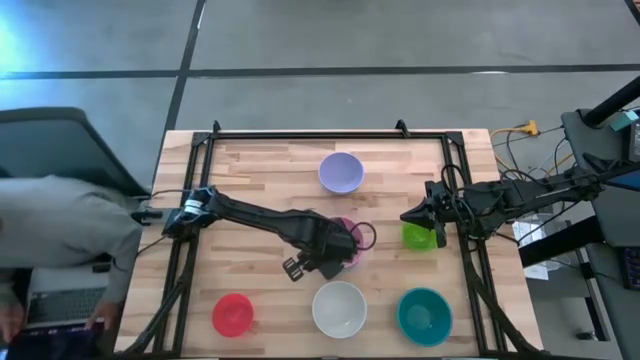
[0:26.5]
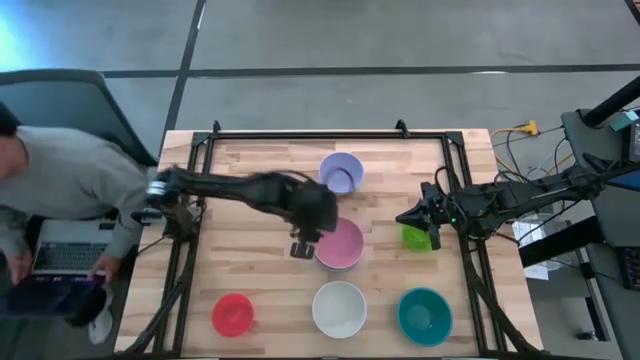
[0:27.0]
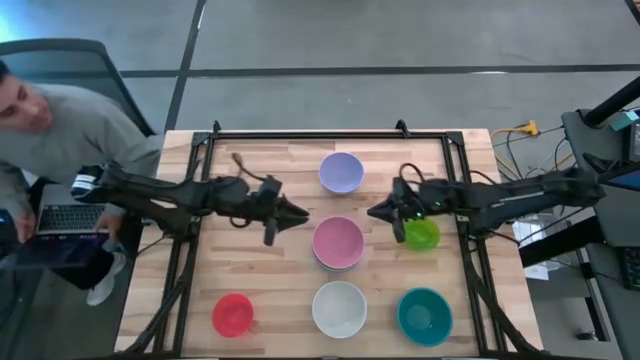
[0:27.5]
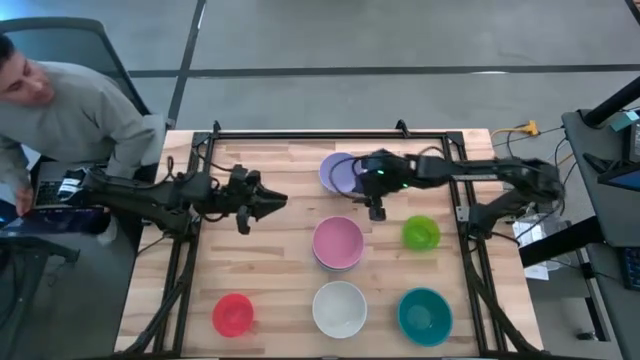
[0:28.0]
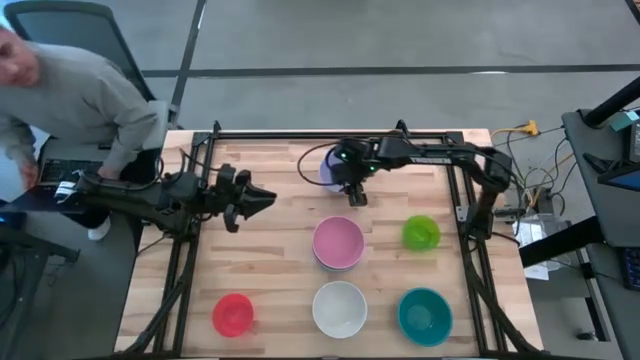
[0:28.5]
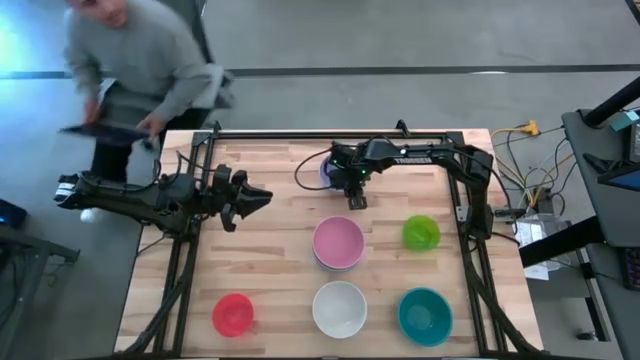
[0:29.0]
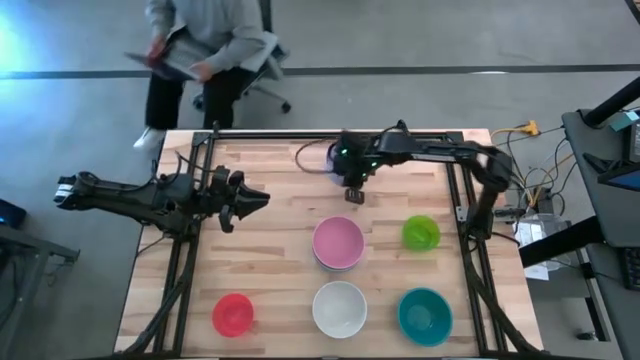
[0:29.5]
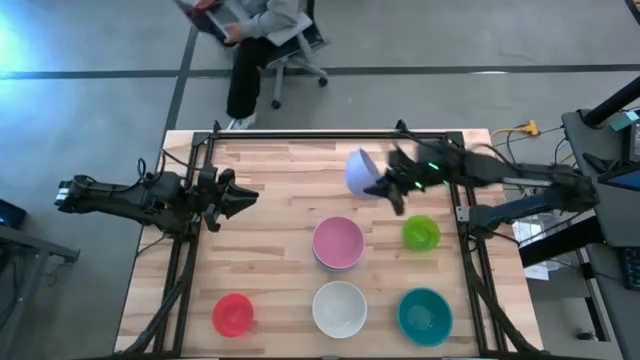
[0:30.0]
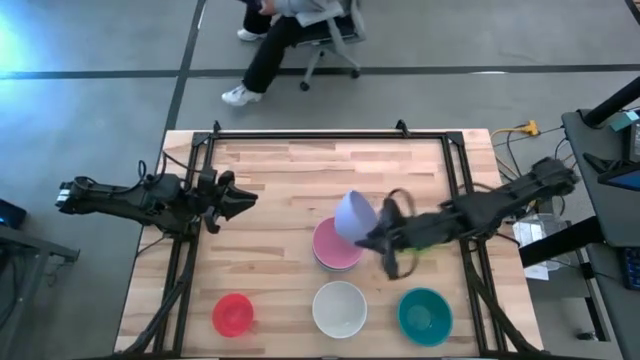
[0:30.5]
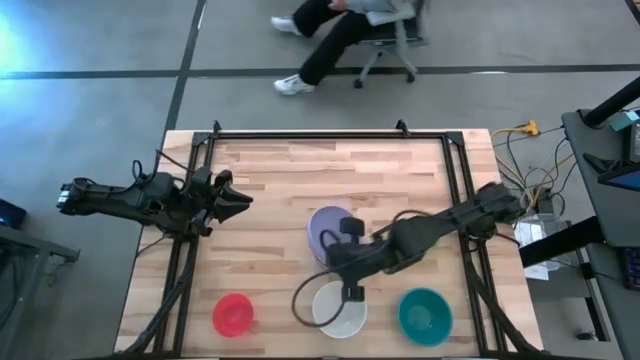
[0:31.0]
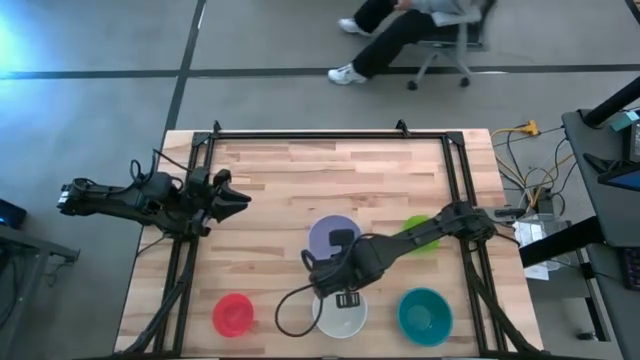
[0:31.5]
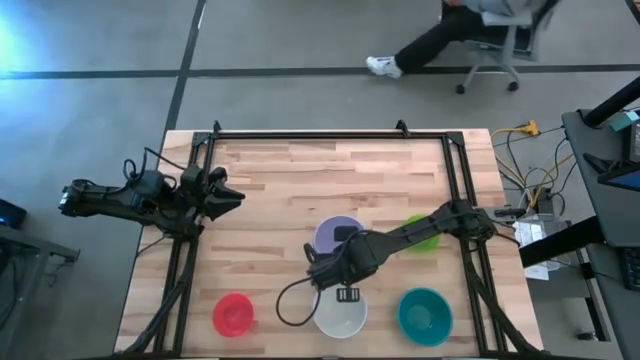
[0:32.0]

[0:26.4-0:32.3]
Task: Nest bowls inside each other
Stack the purple bowl on top of the pink bowl

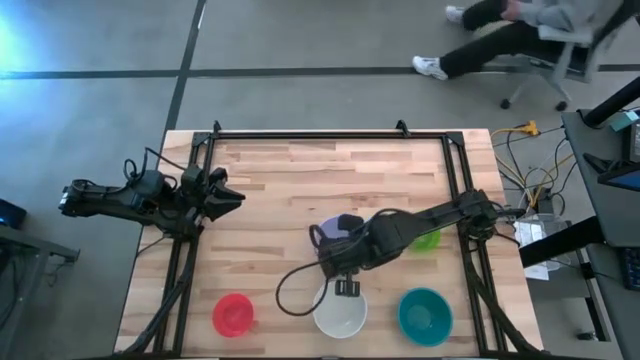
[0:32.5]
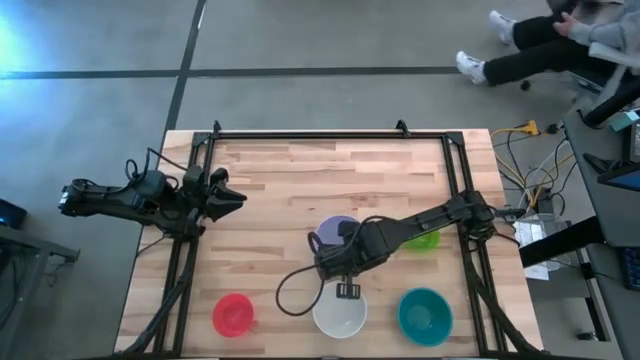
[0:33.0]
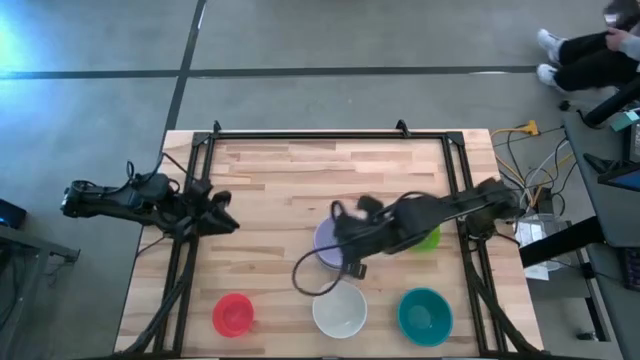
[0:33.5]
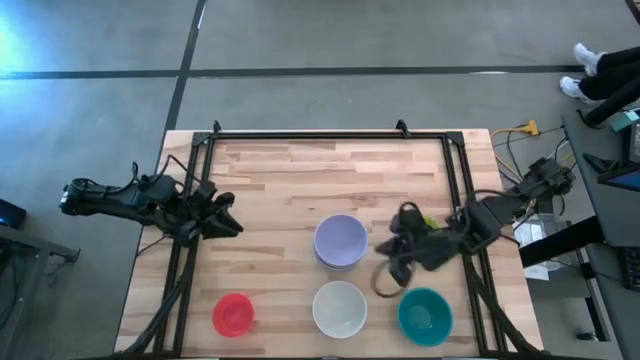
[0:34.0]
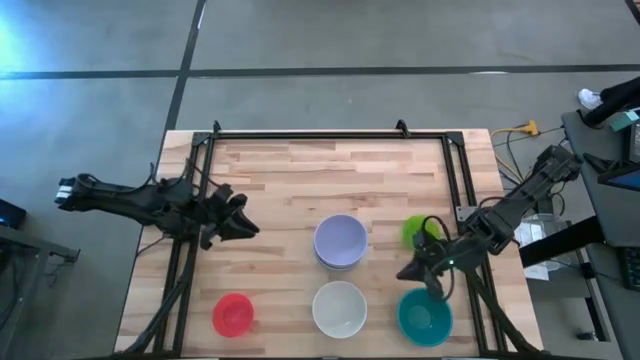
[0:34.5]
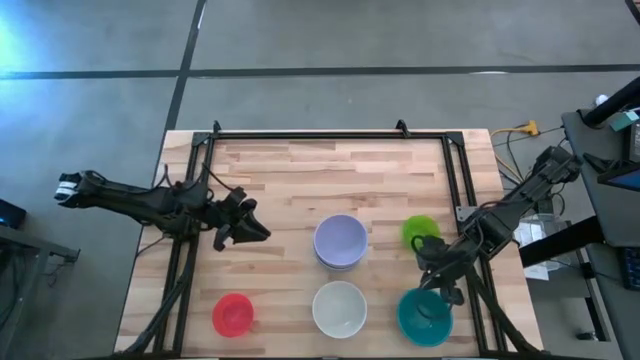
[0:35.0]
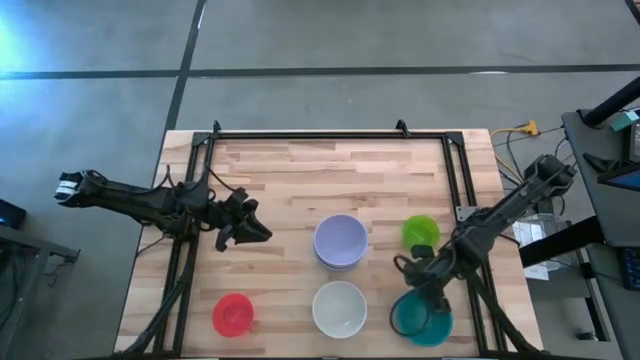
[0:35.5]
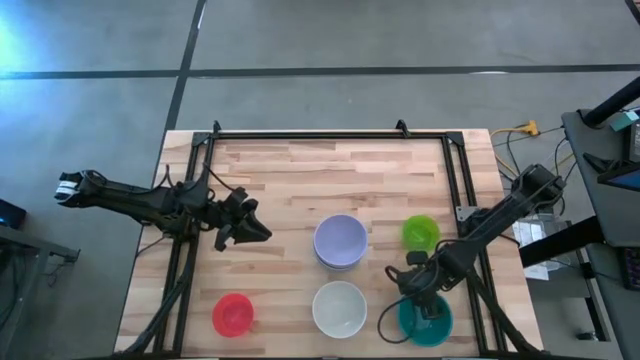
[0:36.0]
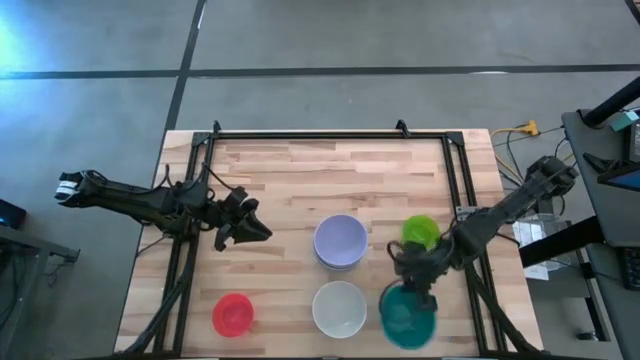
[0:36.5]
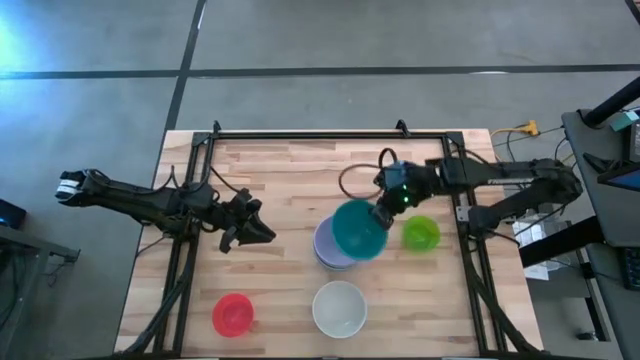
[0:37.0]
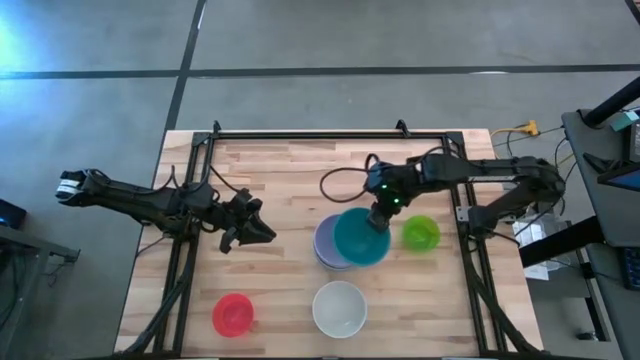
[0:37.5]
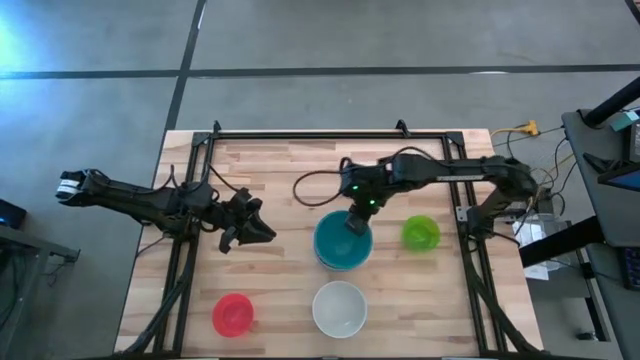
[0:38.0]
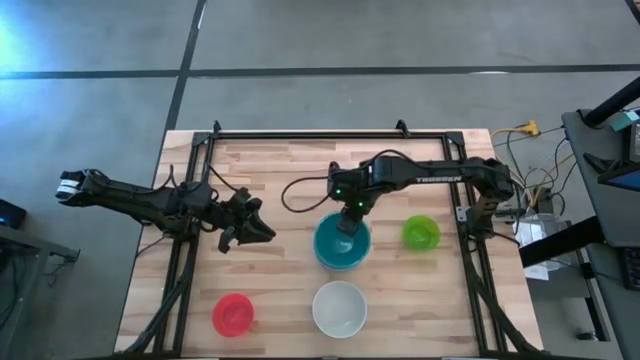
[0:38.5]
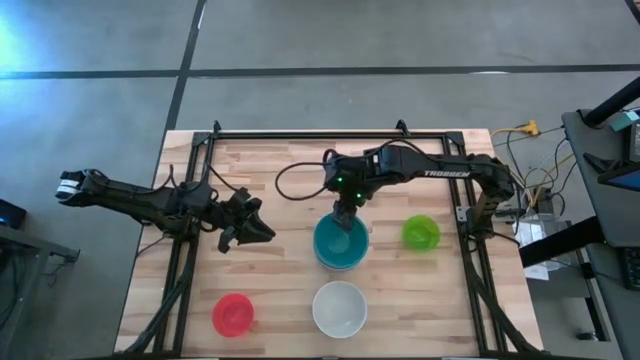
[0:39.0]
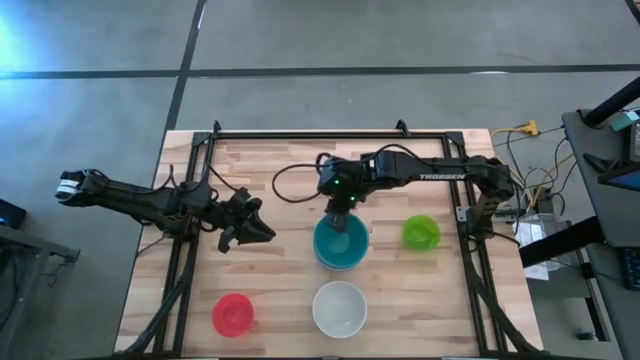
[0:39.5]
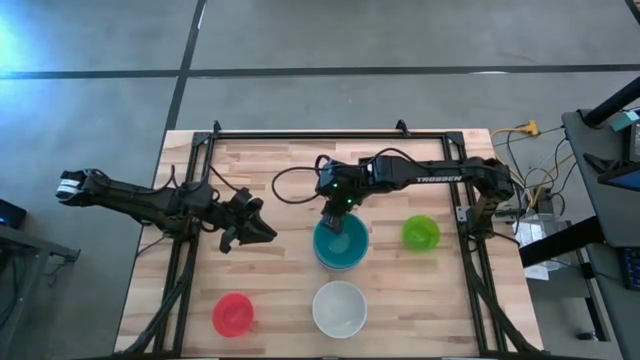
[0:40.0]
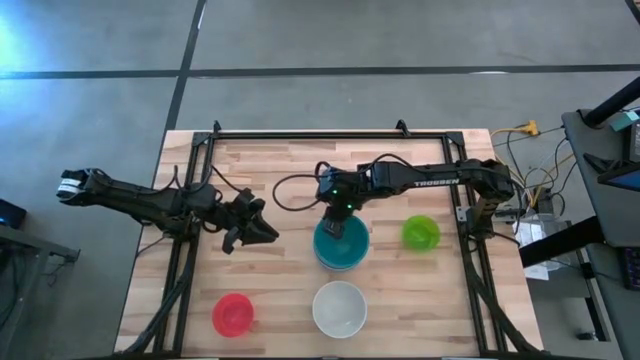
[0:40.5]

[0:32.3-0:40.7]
Stack the light blue bowl on top of the blue bowl

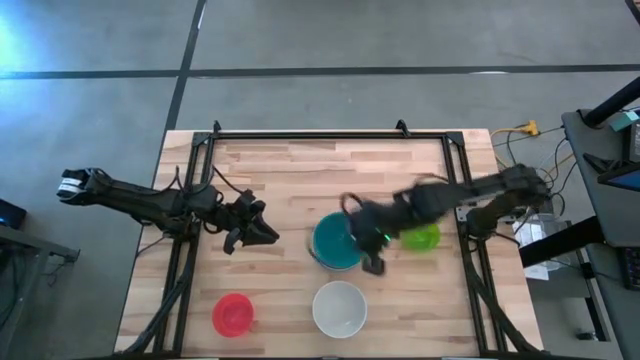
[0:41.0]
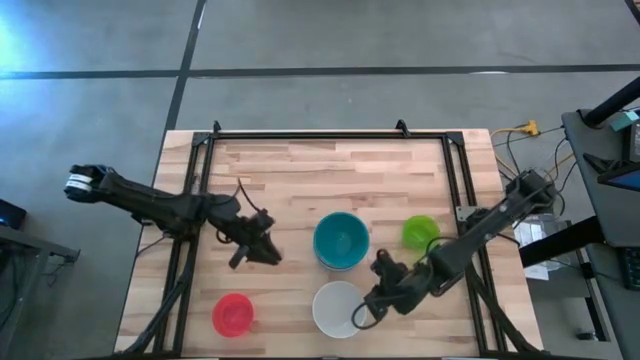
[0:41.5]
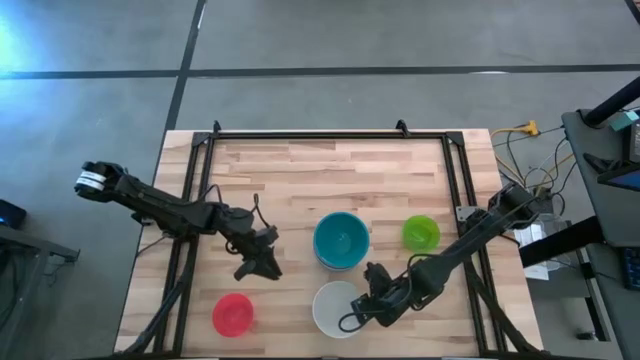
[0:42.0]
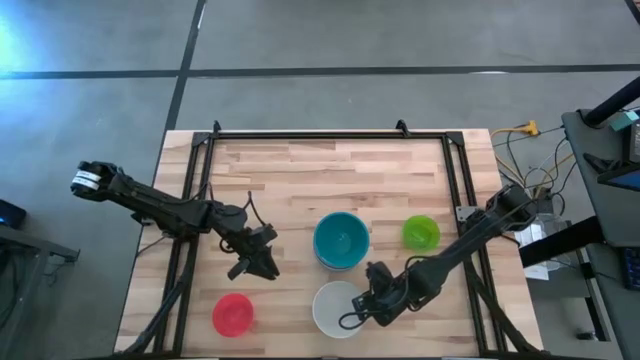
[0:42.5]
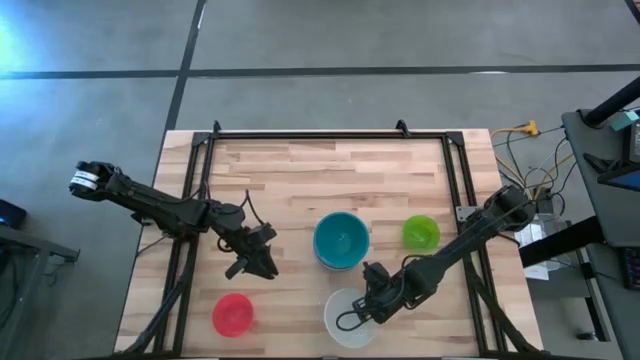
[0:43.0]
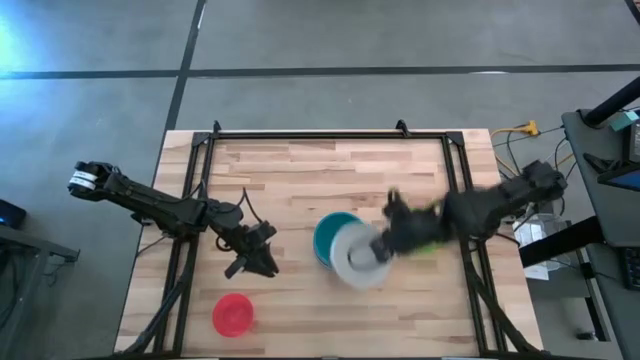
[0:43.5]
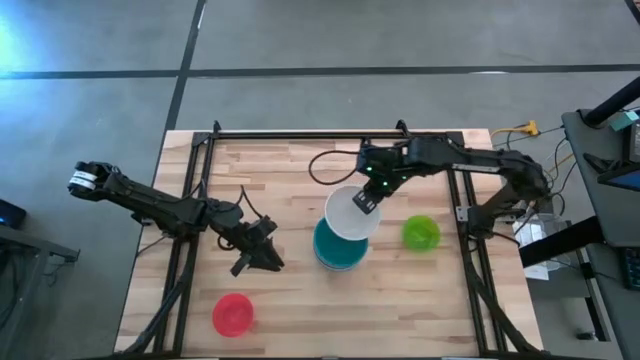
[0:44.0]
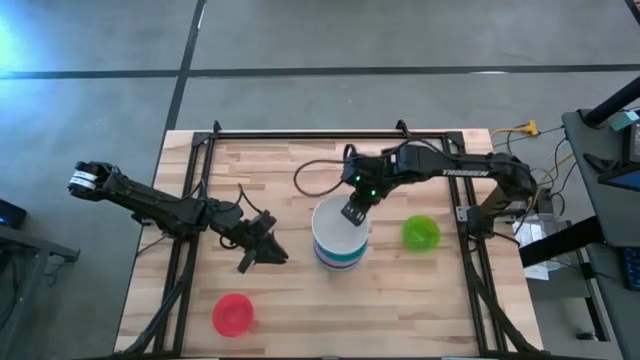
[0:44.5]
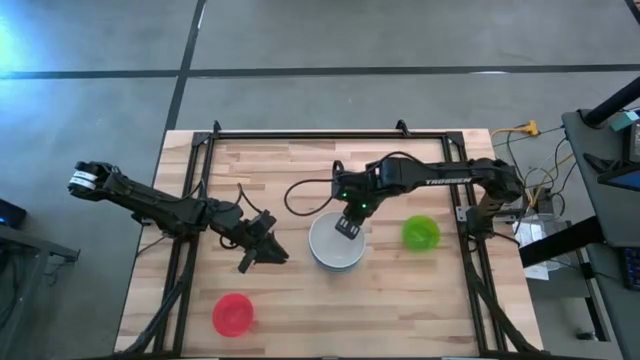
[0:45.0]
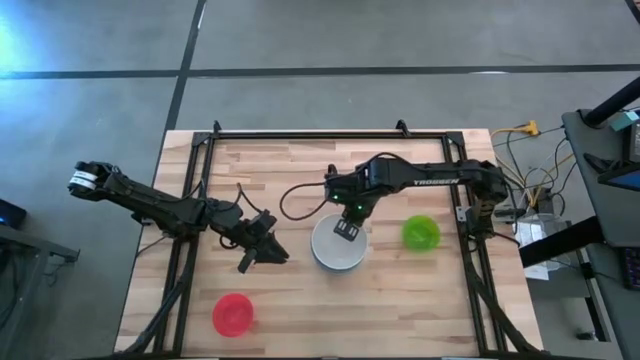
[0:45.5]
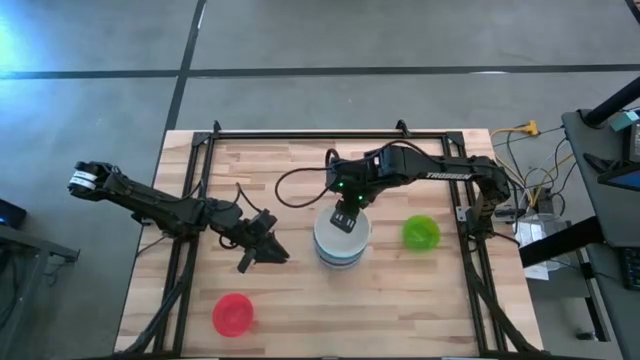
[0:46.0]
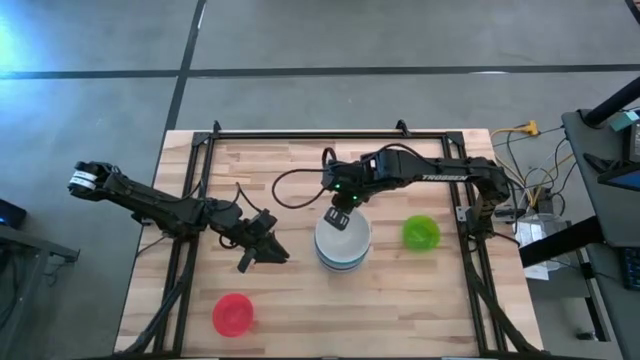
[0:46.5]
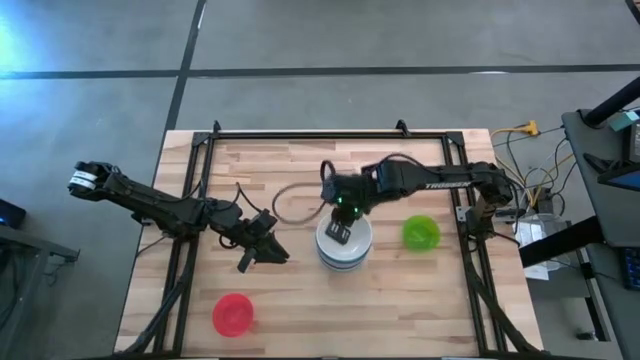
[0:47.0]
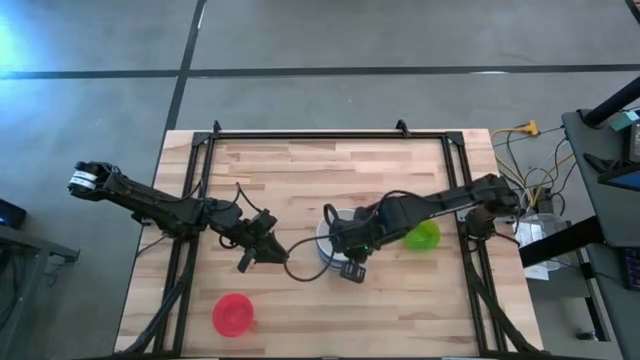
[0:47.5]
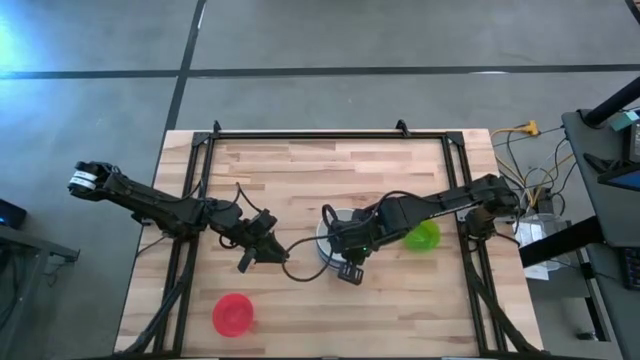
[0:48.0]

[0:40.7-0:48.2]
Stack the white bowl on top of the light gray bowl
